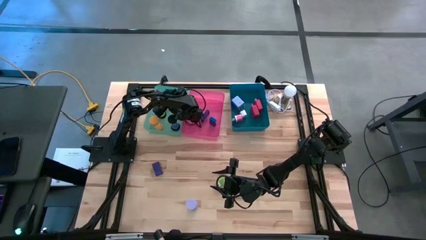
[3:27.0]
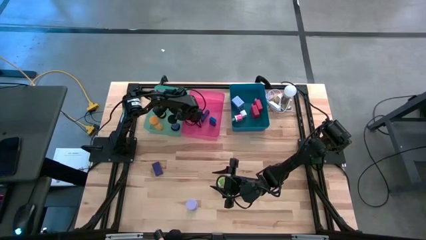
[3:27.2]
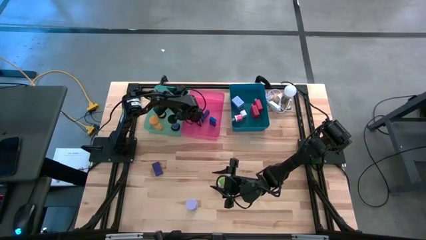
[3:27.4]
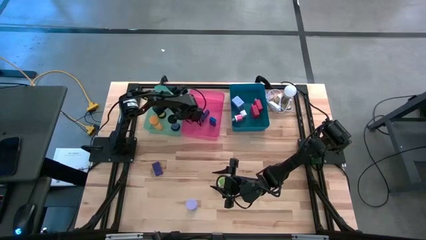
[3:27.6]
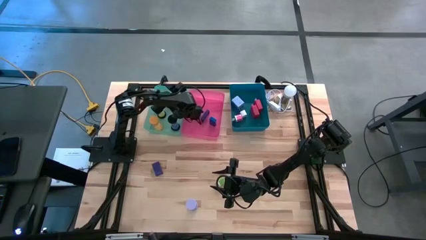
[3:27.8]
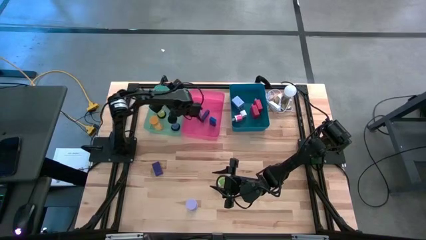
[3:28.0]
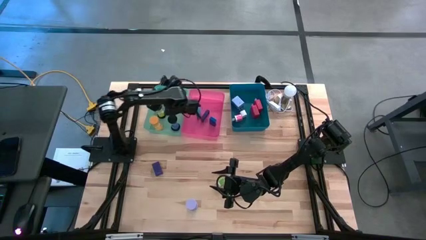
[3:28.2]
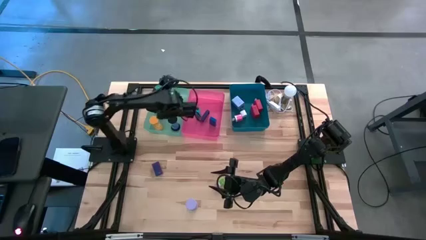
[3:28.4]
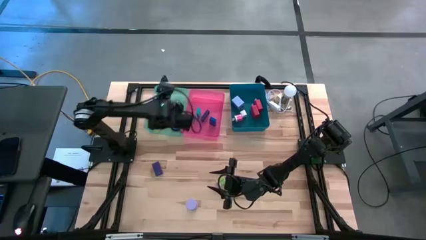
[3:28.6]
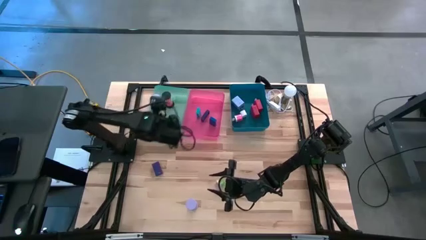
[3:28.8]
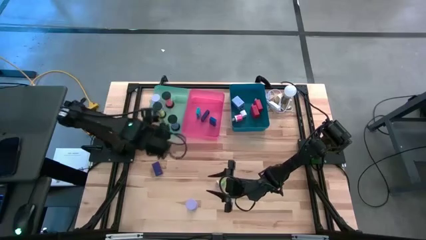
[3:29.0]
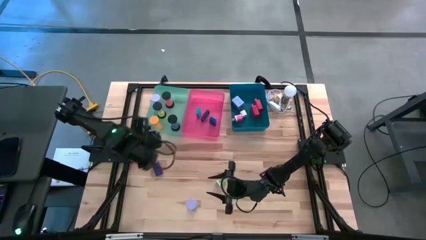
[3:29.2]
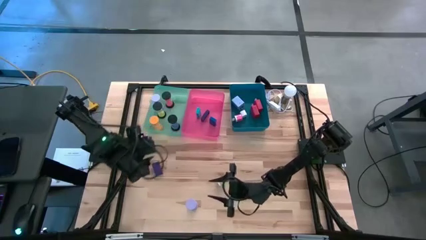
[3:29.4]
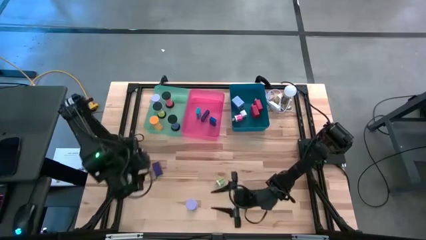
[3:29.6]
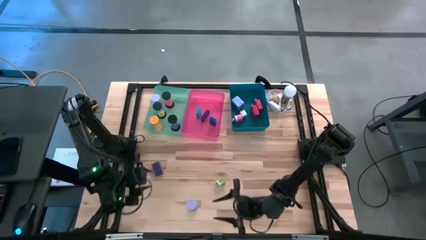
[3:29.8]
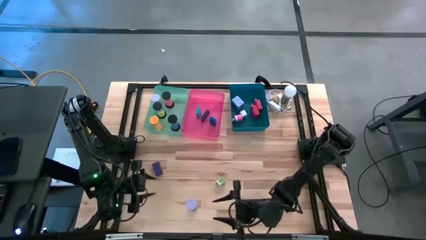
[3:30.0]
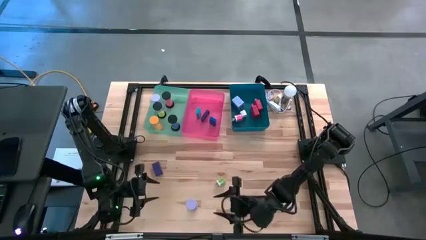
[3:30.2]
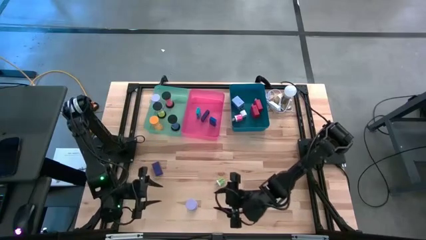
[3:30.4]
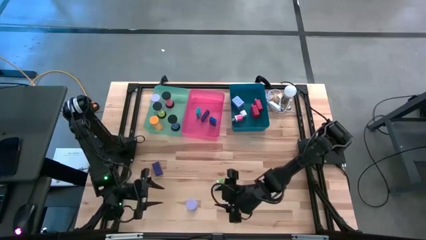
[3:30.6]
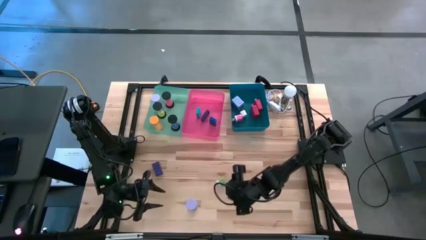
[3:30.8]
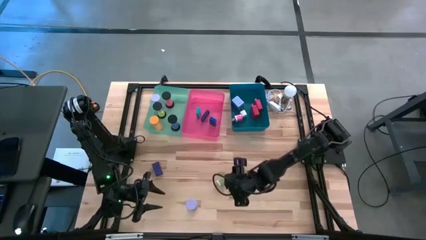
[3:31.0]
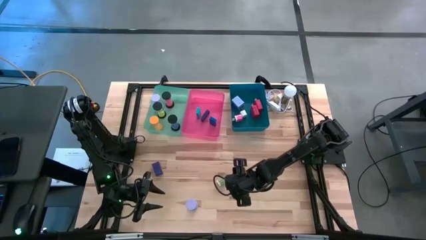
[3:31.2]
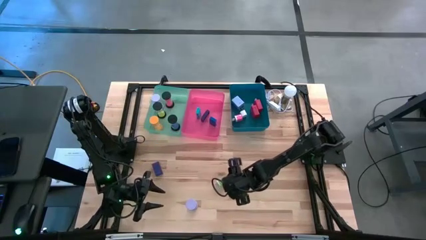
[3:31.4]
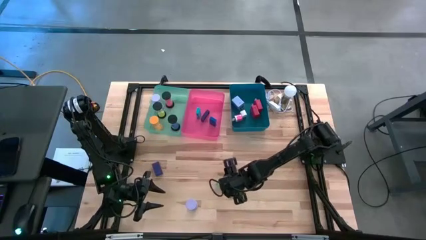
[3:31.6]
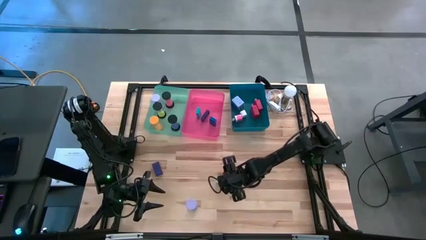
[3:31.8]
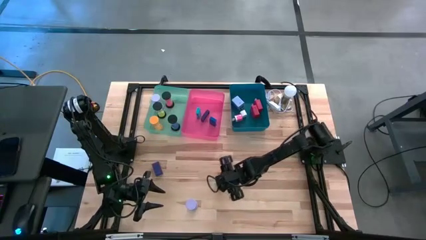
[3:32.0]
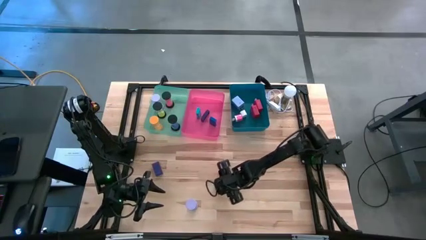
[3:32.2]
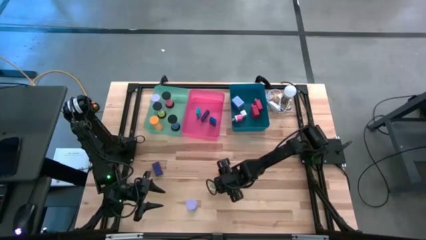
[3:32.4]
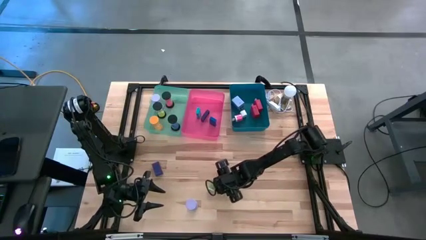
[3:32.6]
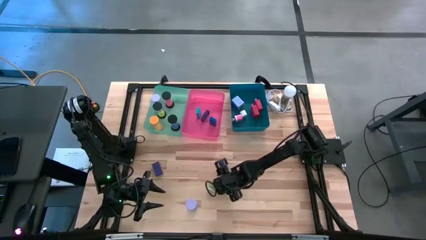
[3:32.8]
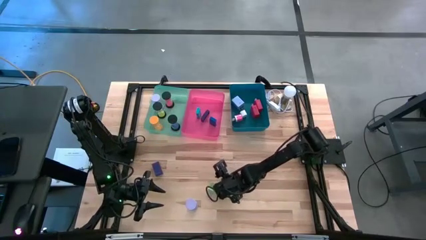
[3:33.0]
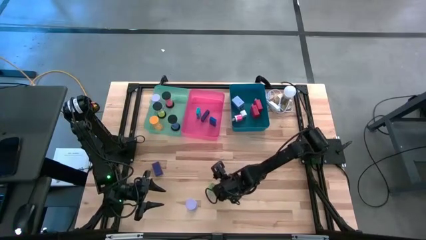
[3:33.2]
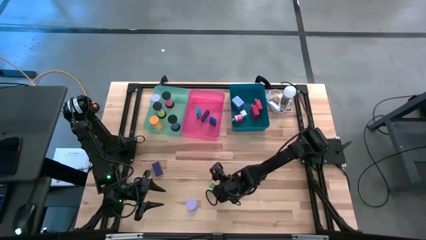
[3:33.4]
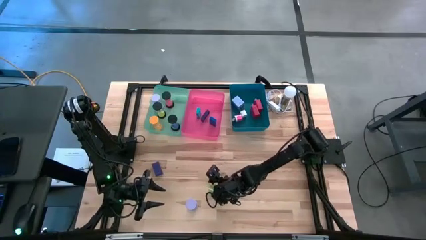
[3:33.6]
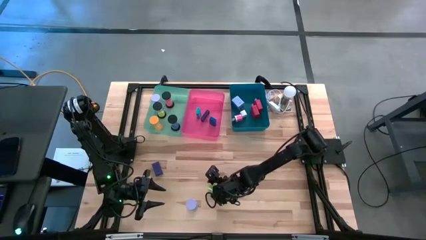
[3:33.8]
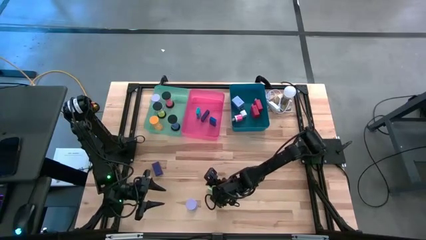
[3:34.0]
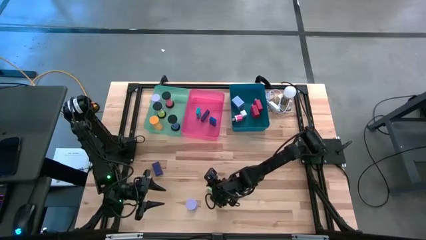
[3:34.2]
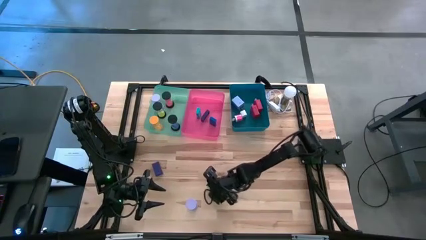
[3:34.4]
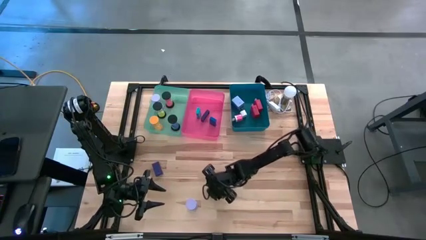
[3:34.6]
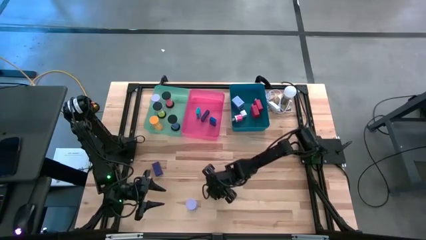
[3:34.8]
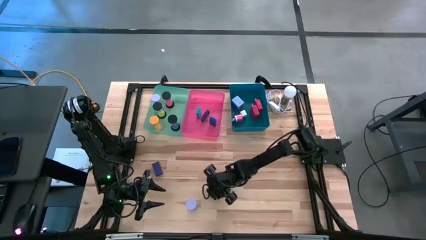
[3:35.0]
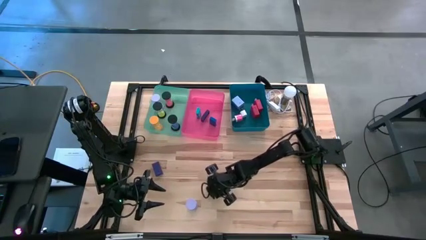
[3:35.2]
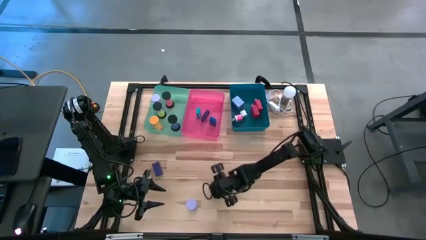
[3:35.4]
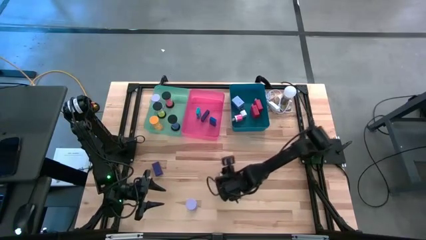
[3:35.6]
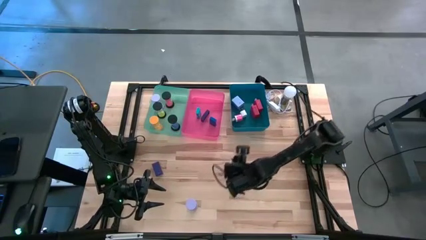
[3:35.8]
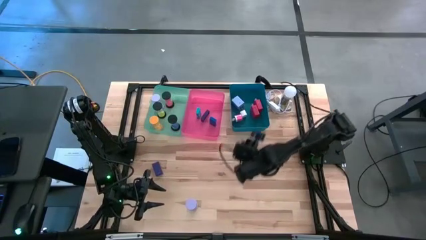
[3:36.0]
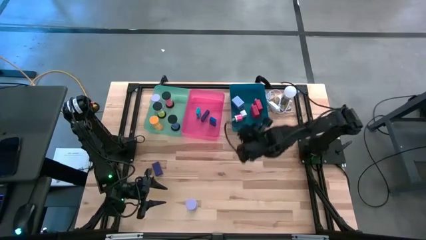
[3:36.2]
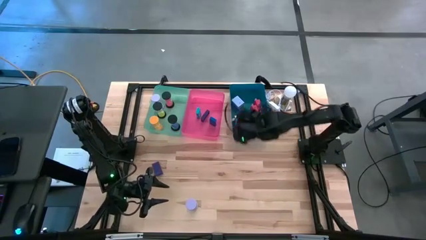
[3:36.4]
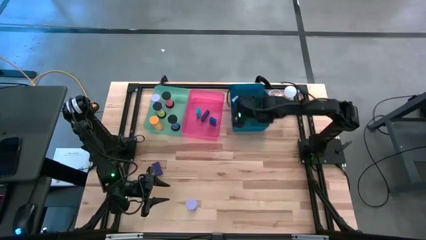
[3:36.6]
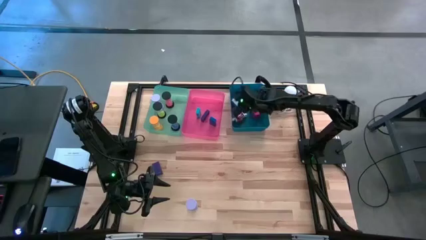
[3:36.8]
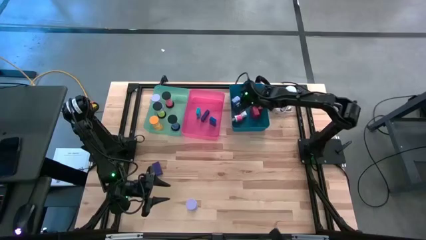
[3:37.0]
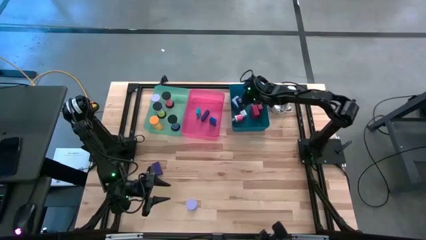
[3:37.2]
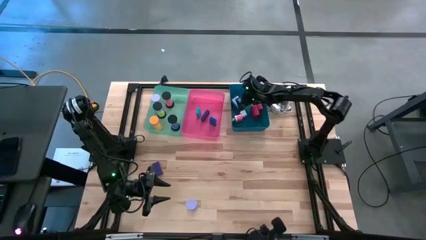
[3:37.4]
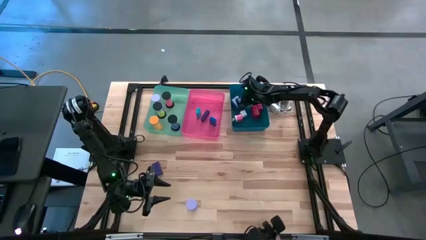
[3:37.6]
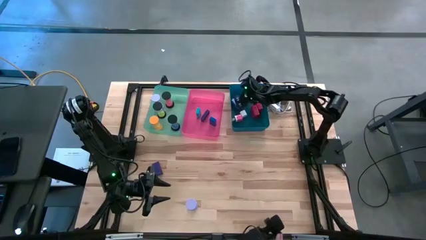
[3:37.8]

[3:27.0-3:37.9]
Task: Pick & Place Office items
Put the green charger adapter into the blue bin
